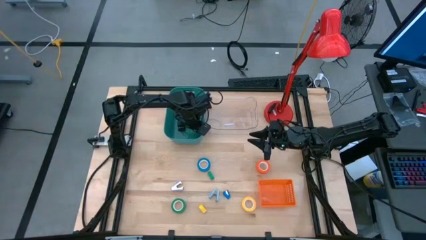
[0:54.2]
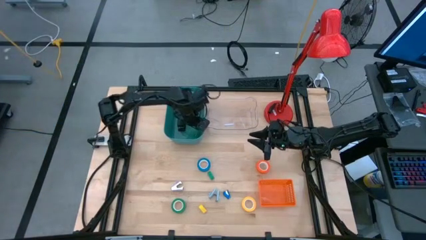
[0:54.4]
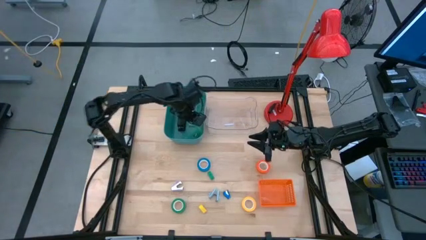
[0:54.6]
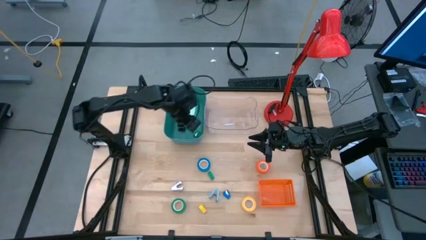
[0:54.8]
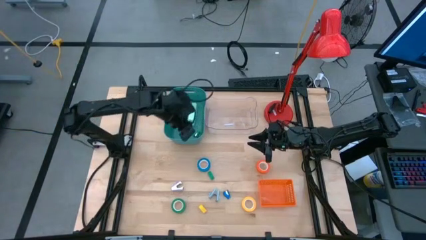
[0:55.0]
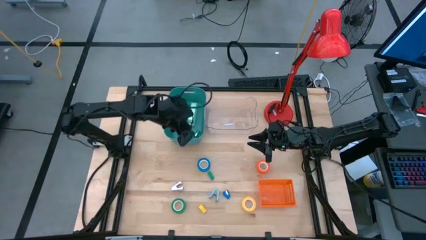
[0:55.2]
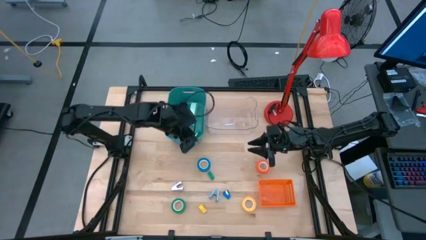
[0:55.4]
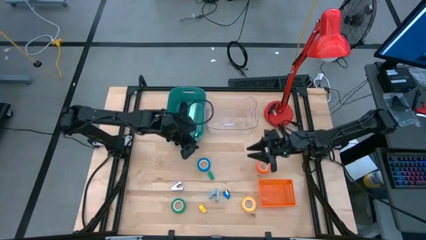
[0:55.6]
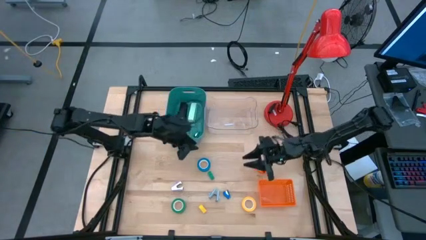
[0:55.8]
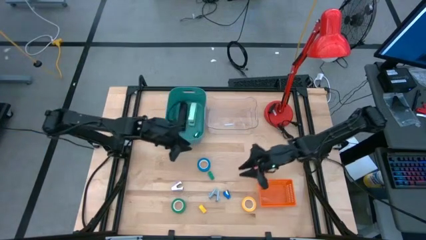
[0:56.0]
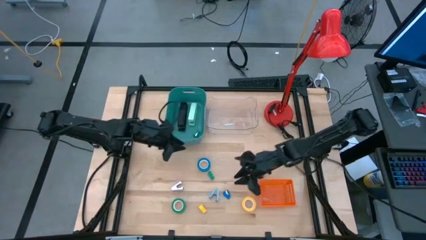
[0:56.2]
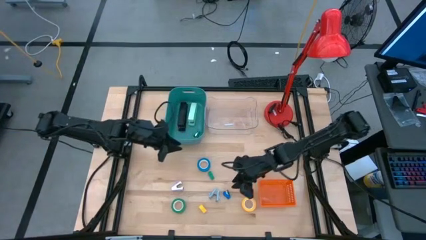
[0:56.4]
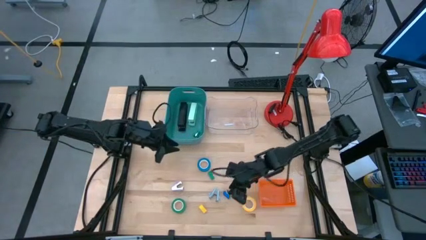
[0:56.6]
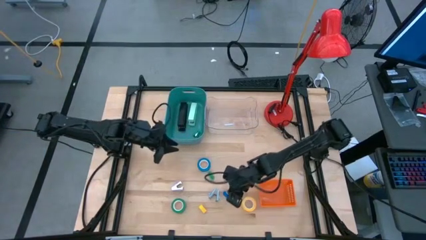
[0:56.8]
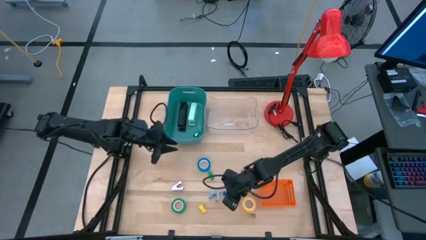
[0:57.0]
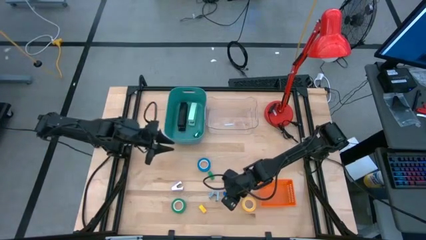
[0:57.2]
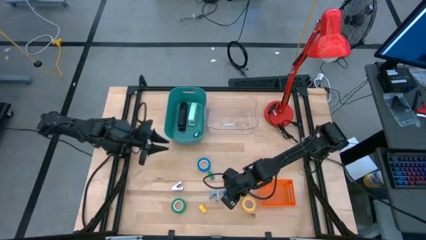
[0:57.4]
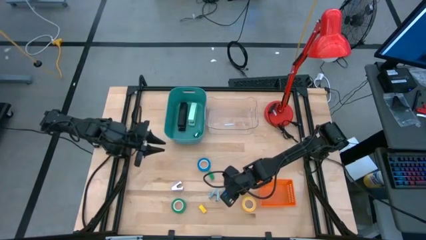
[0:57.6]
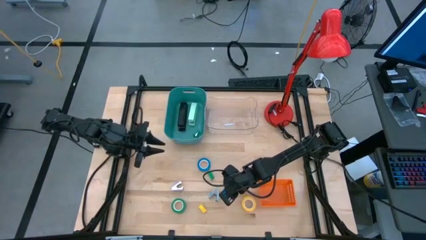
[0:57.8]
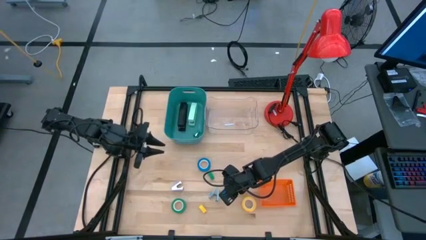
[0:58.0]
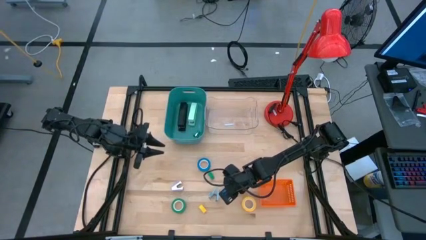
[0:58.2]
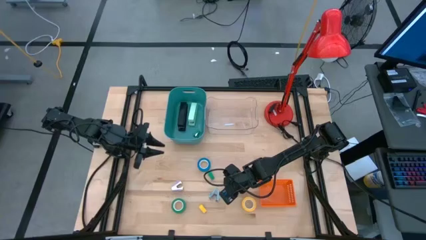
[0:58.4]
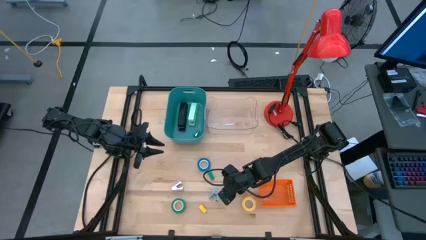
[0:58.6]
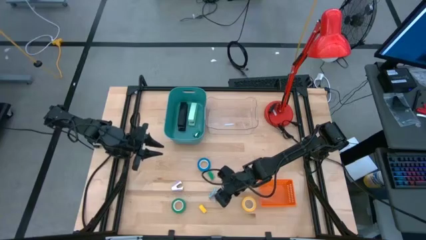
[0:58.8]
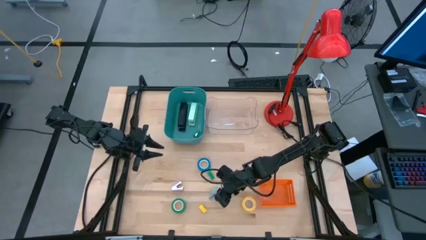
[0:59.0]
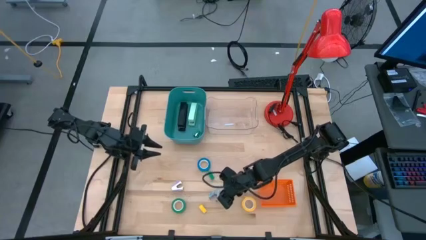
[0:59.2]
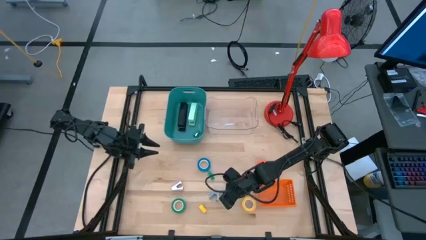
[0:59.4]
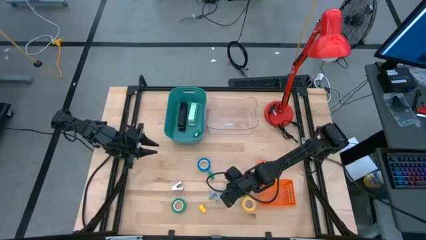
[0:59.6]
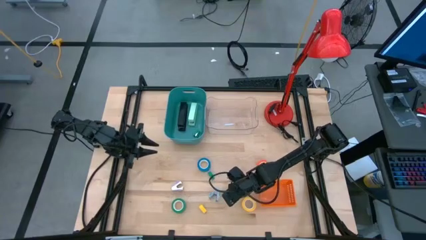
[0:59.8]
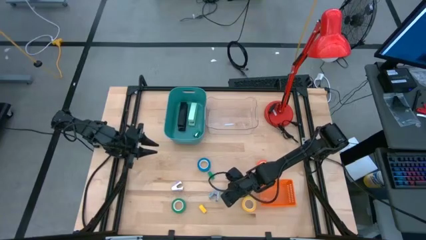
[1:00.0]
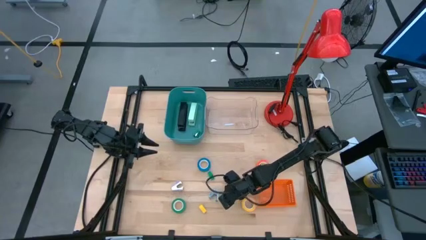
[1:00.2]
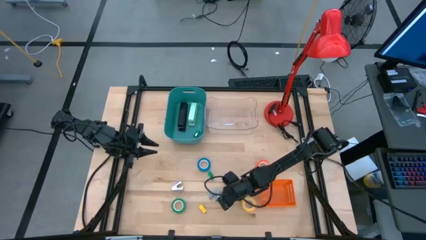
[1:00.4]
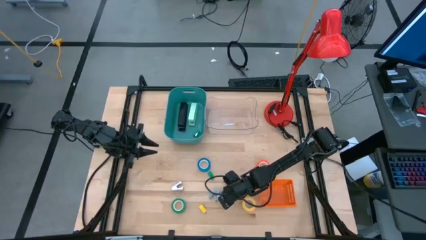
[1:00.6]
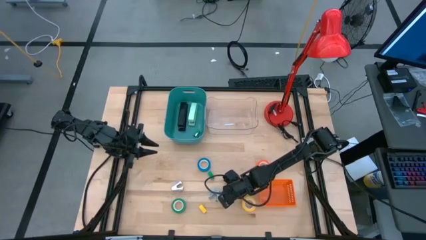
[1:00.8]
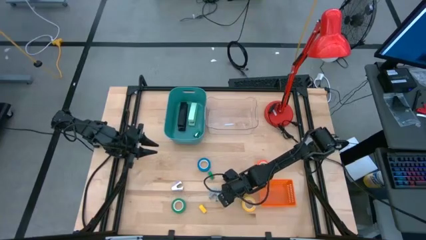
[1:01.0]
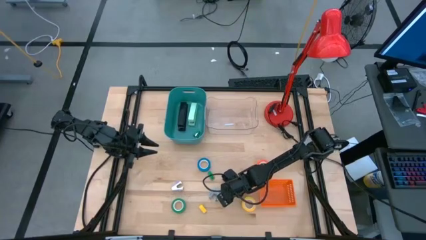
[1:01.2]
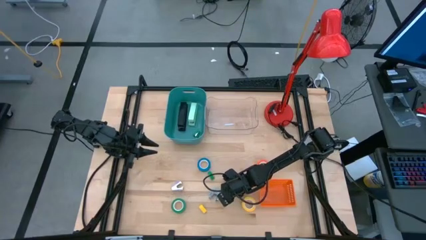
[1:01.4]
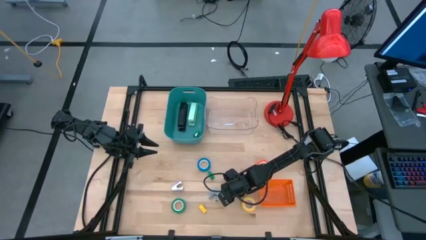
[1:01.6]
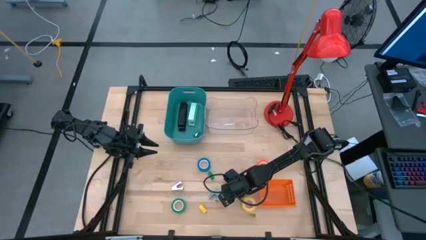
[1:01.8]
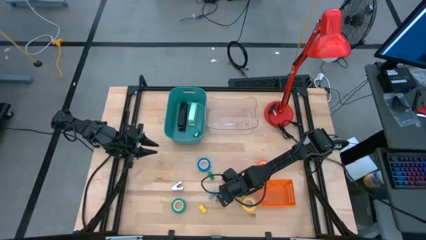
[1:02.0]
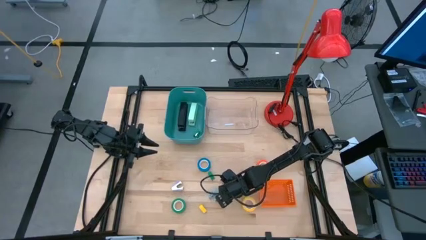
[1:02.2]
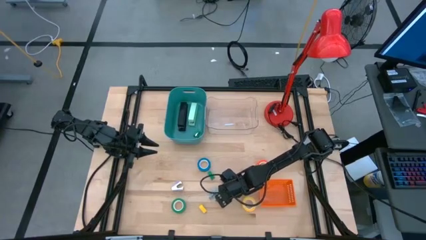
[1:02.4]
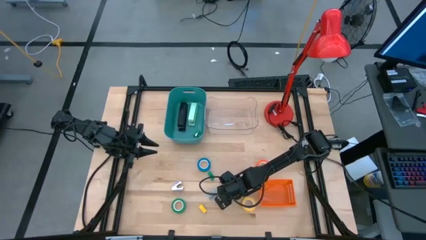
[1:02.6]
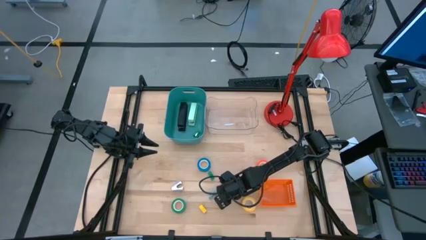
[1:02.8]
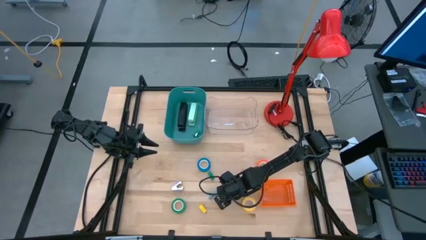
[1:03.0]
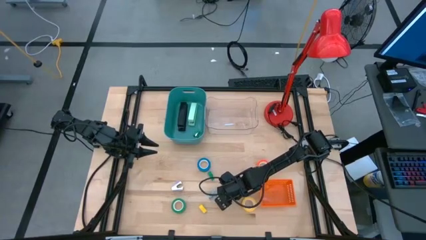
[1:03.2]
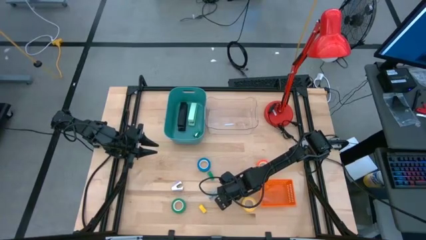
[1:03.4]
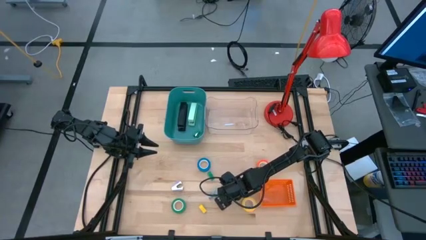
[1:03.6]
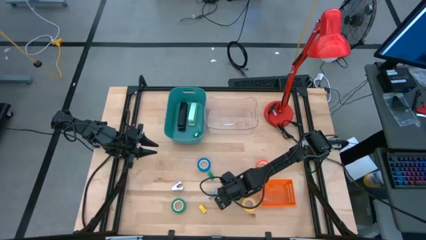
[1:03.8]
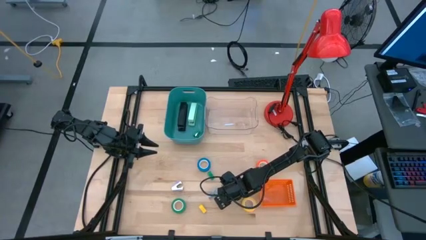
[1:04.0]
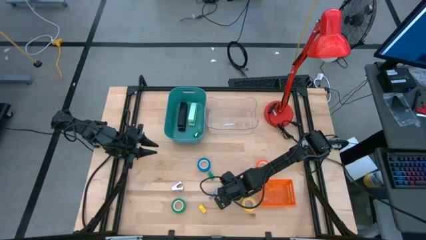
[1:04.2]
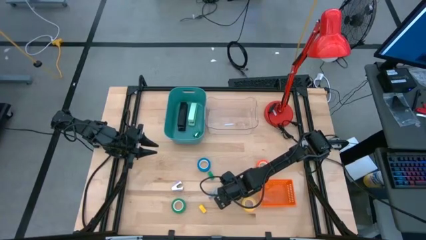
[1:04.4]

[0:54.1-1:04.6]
Task: Pick and place Stapler, Stapler remover, tape
Put the mini blue stapler into the blue bin

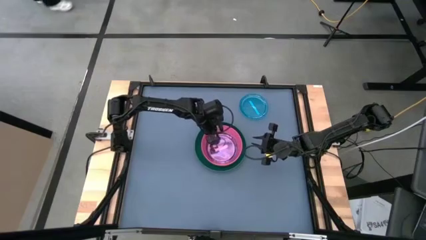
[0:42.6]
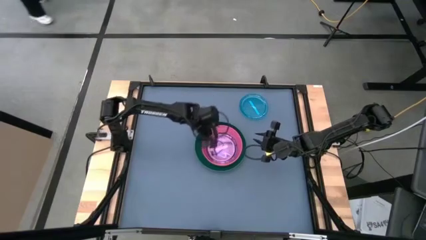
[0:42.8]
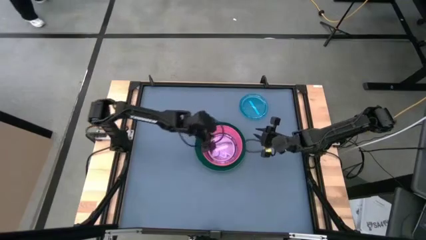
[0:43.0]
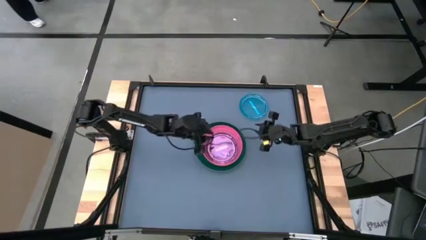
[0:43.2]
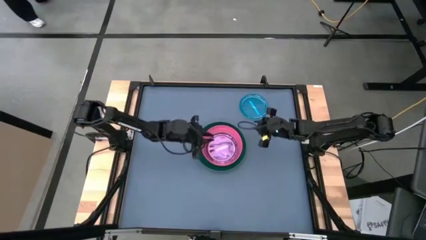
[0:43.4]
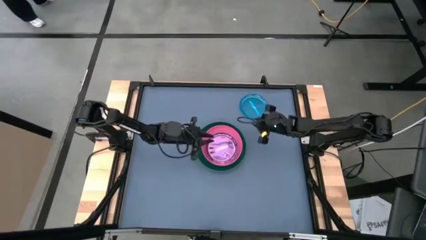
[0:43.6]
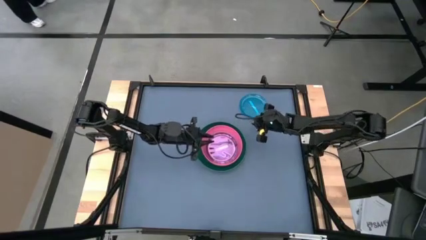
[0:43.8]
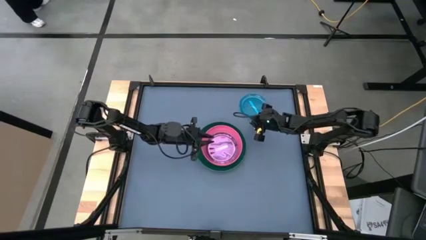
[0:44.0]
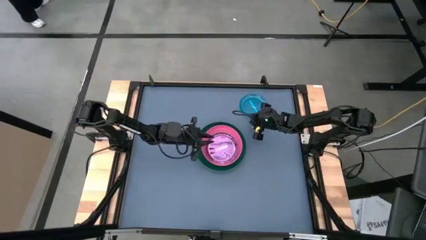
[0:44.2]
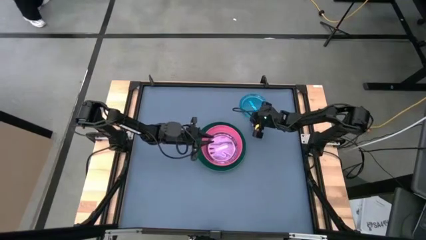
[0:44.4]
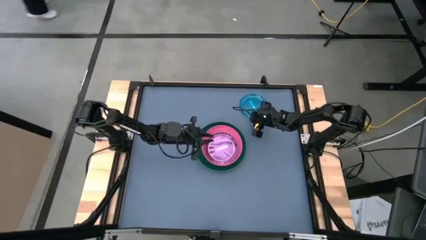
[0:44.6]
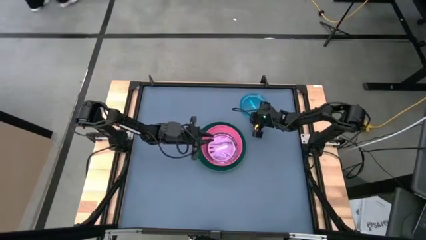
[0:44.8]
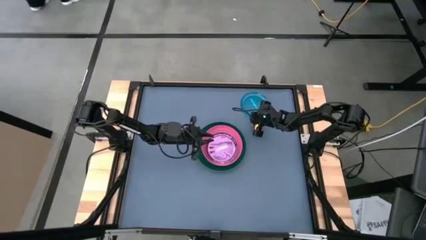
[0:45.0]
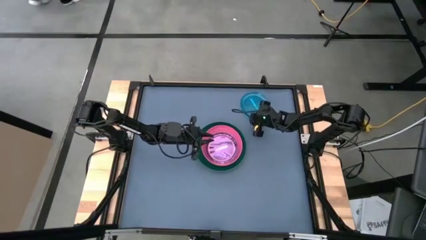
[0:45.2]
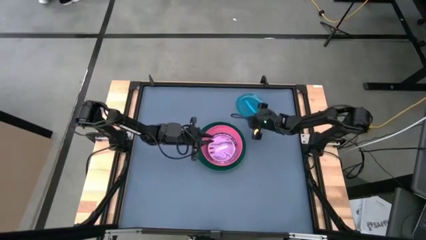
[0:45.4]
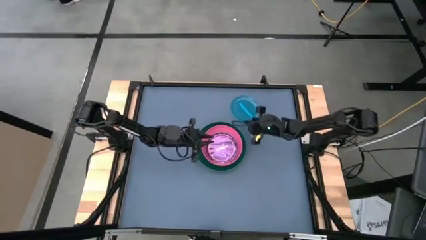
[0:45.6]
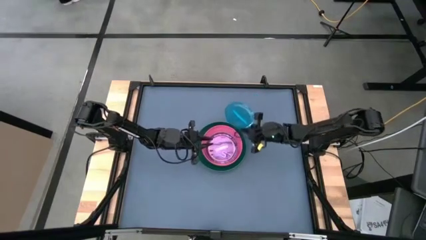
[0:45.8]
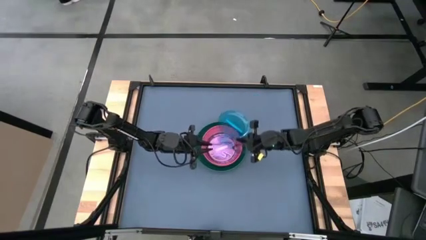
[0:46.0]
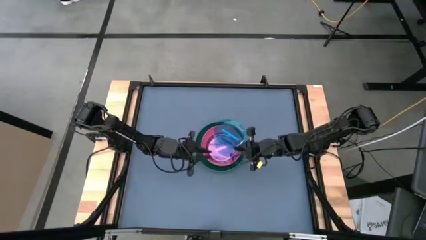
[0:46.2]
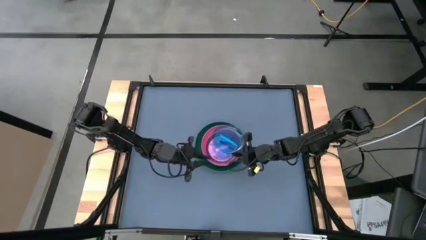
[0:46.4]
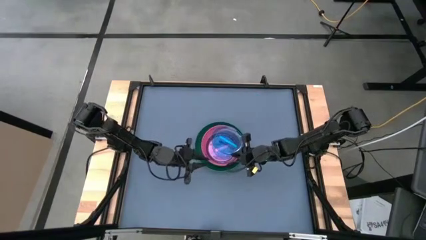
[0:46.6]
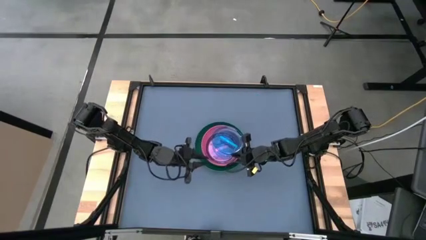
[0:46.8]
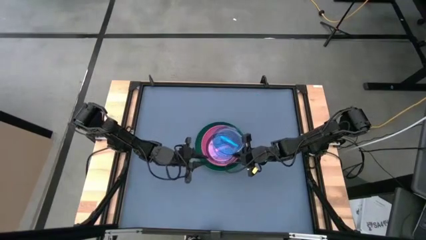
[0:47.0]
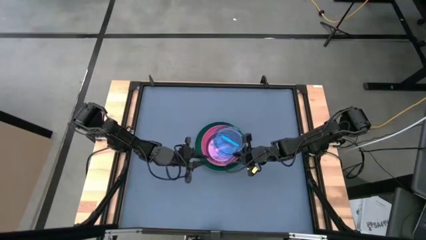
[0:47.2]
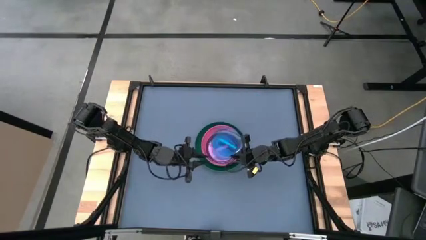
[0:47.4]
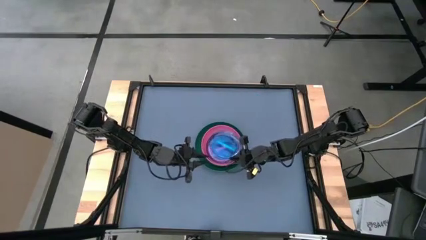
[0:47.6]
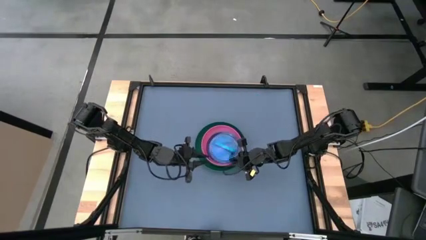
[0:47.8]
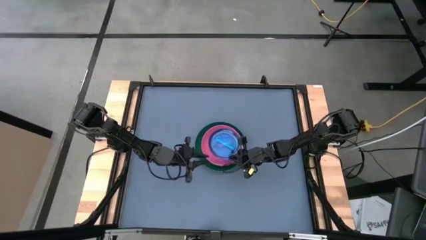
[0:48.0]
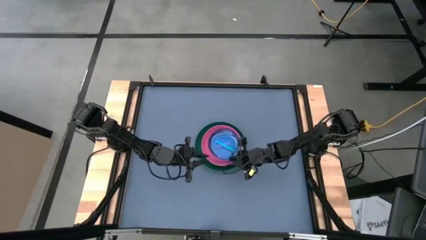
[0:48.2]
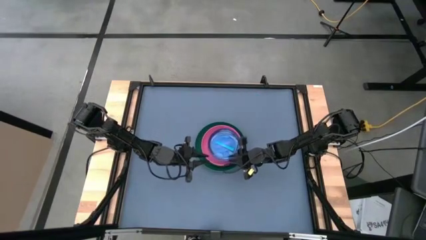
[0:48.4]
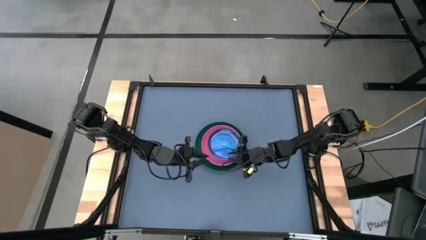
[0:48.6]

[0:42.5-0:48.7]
Task: Stack plastic plates
Stack the blue plate on the light pink plate
